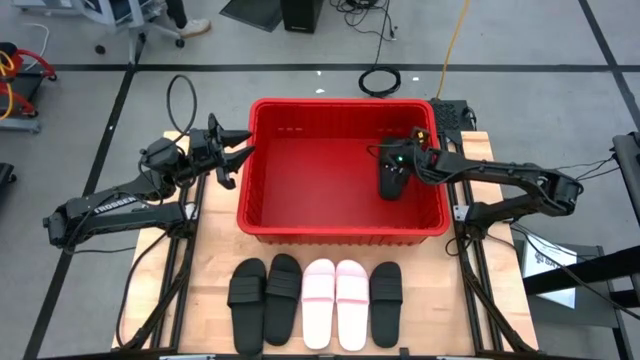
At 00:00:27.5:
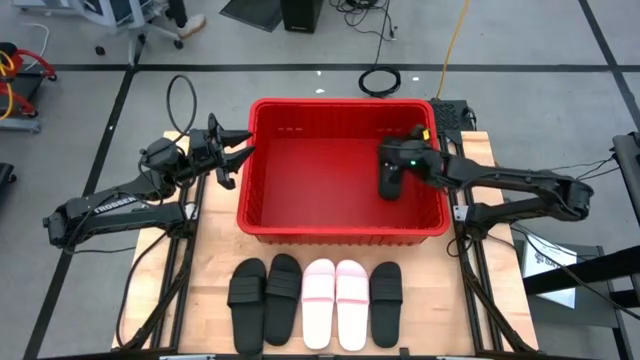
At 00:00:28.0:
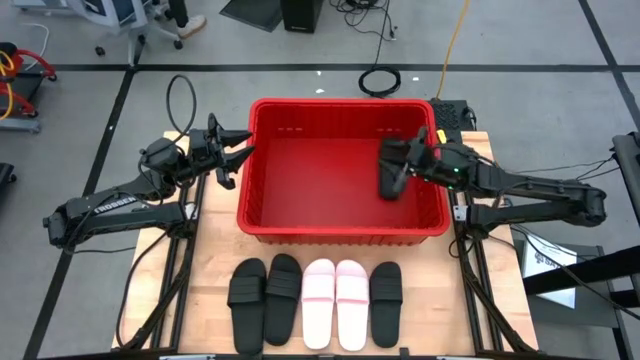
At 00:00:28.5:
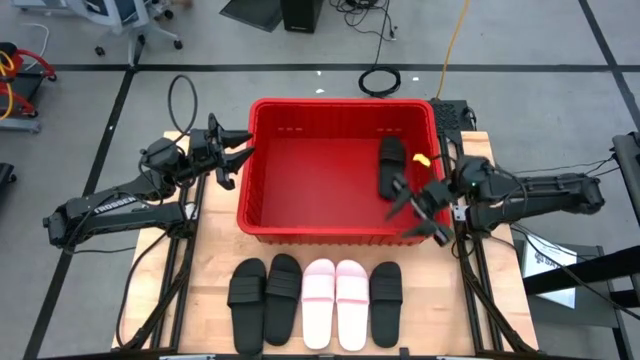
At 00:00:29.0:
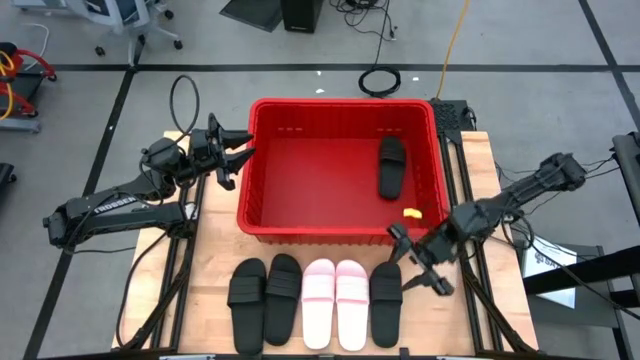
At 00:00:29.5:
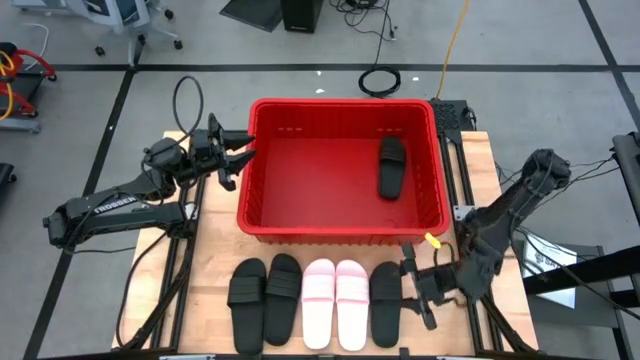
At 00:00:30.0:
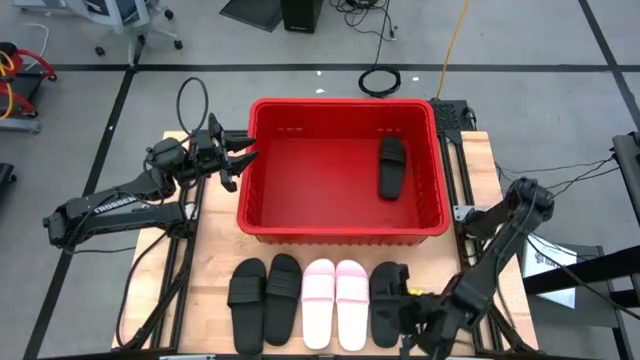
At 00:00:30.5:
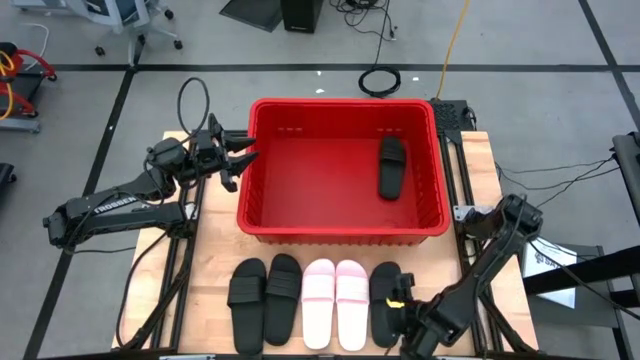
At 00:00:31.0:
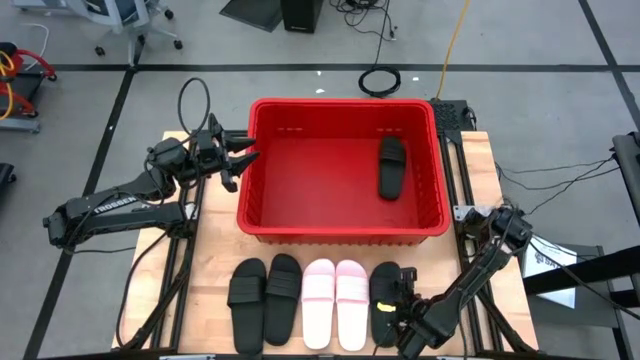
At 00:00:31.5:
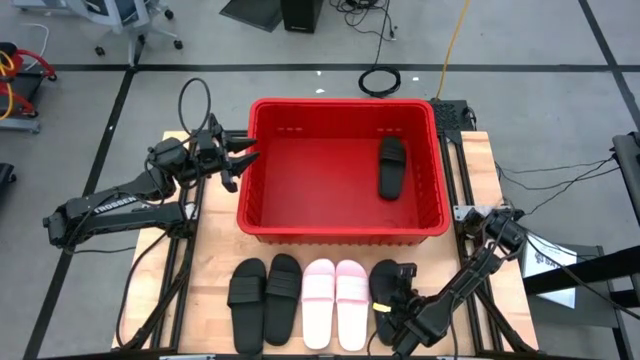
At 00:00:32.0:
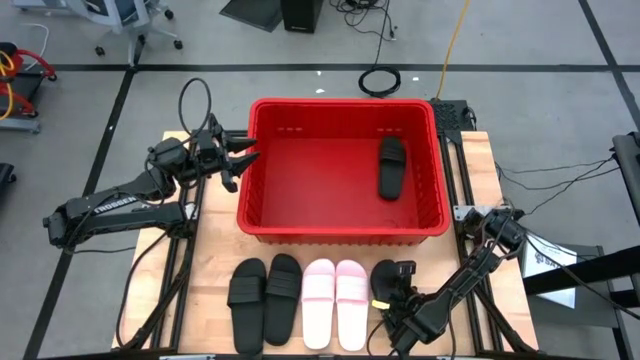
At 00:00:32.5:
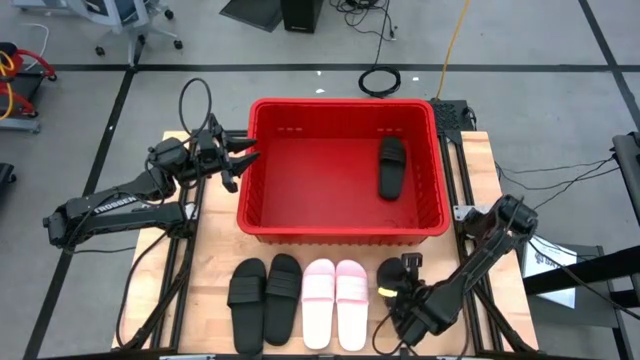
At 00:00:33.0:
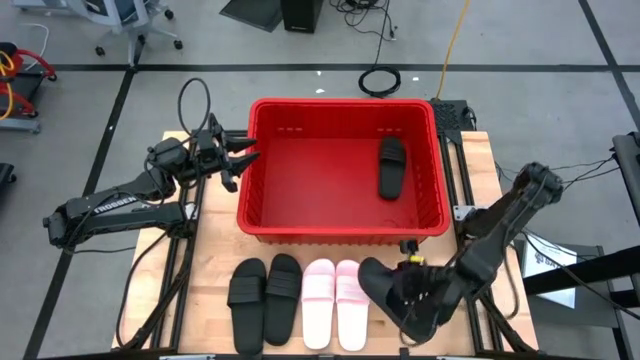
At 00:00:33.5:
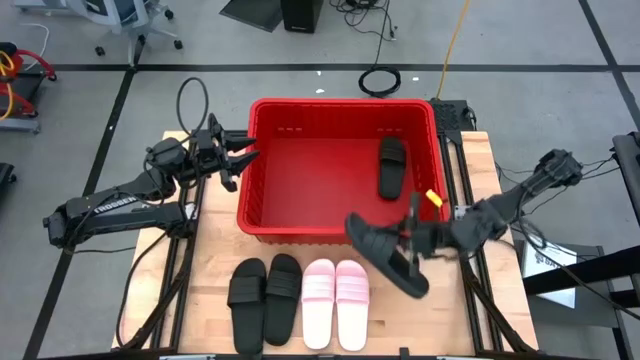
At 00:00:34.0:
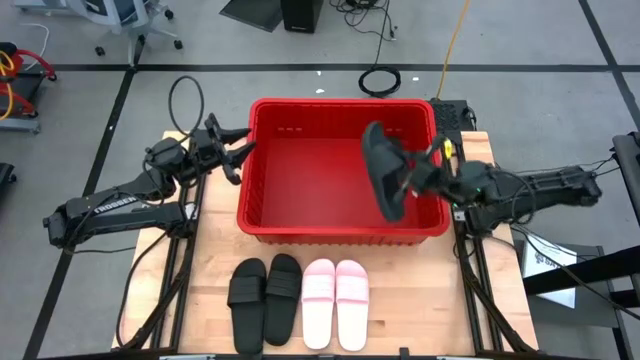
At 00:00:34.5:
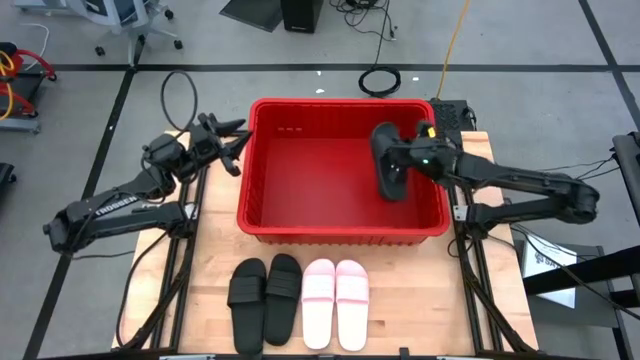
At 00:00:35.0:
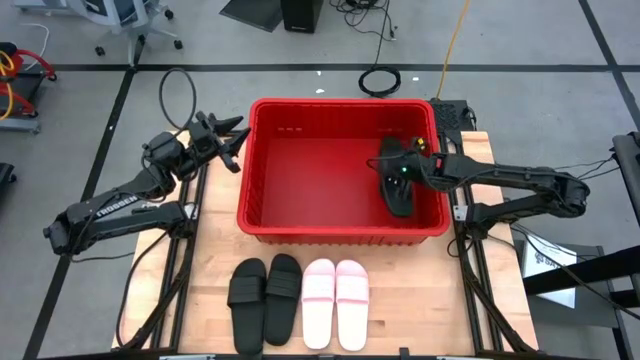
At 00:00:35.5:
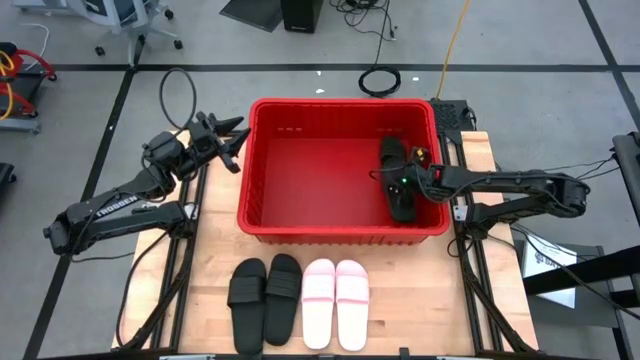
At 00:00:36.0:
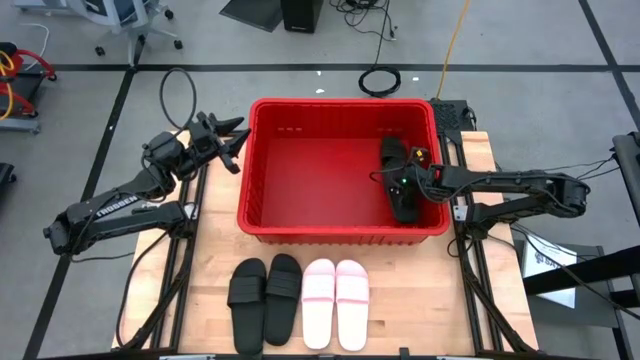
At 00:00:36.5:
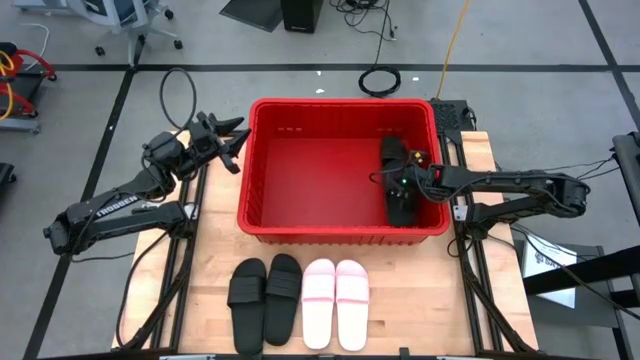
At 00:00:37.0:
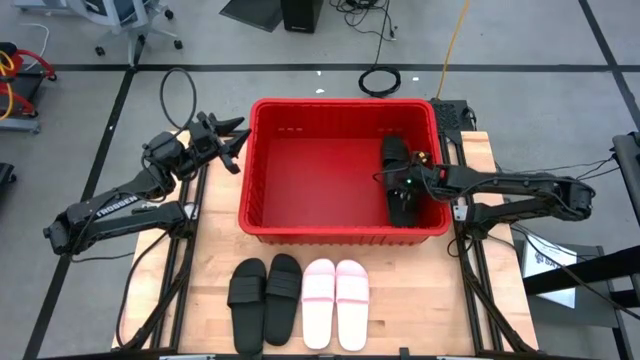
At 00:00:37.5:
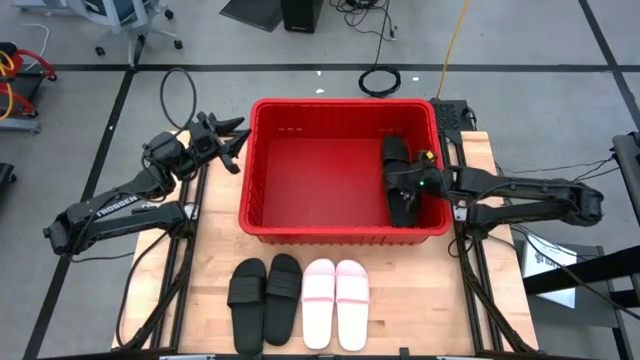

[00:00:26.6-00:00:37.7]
Task: Pick and place slides into bin
Put the black slipper into the red container

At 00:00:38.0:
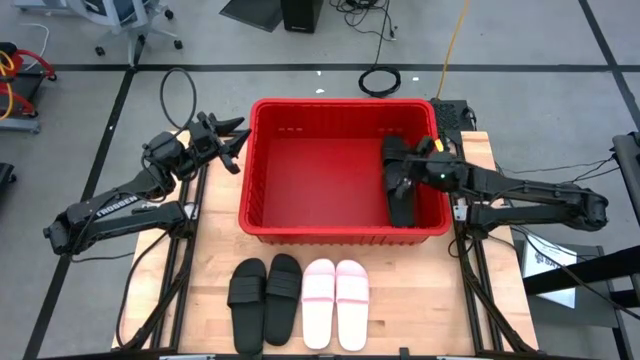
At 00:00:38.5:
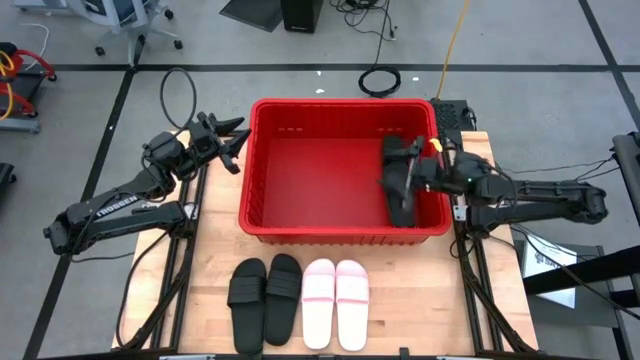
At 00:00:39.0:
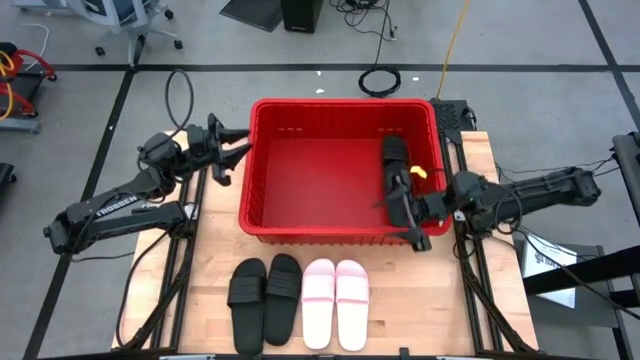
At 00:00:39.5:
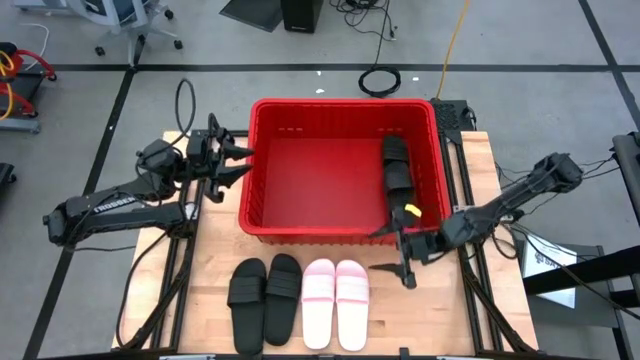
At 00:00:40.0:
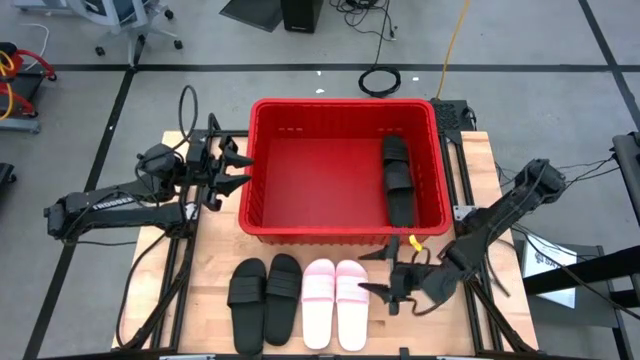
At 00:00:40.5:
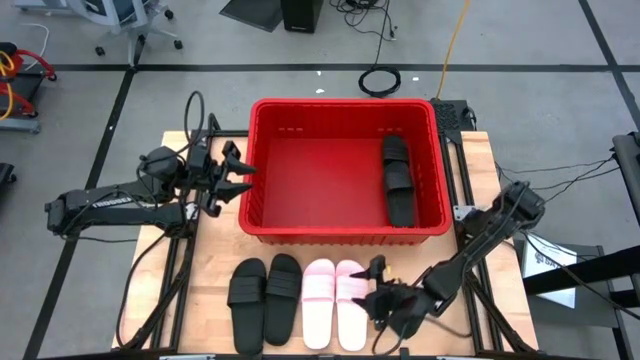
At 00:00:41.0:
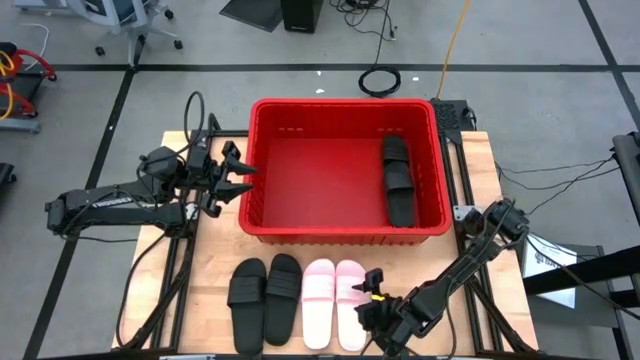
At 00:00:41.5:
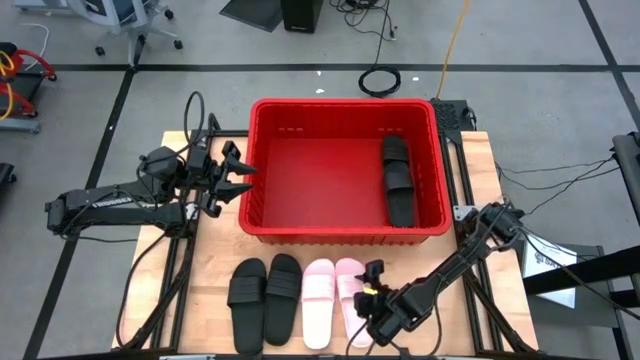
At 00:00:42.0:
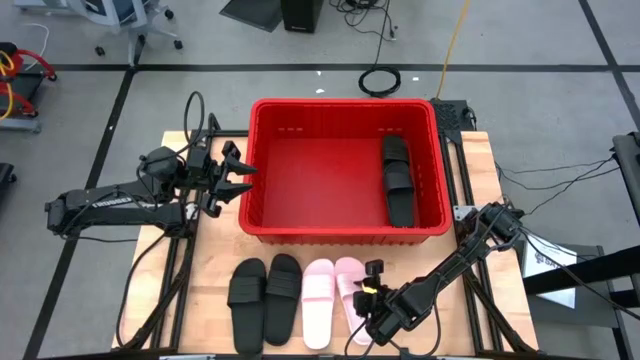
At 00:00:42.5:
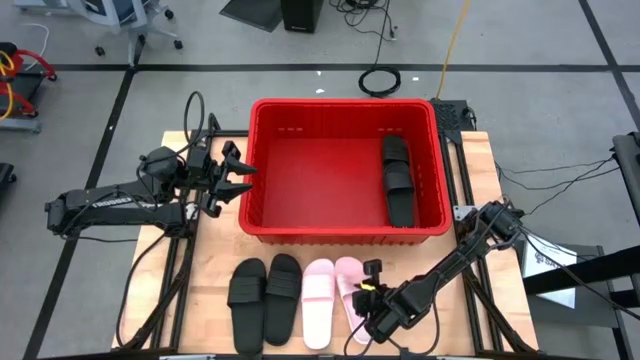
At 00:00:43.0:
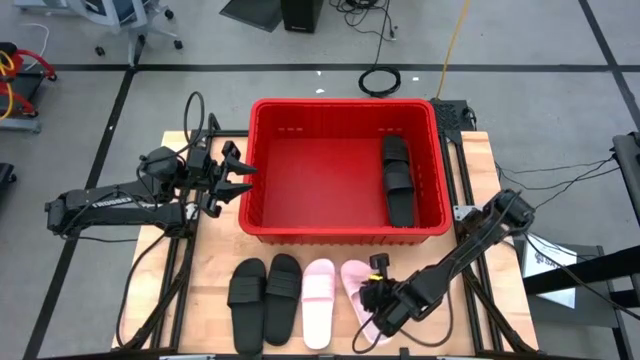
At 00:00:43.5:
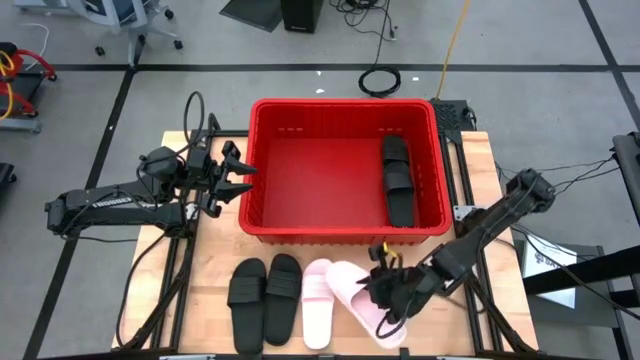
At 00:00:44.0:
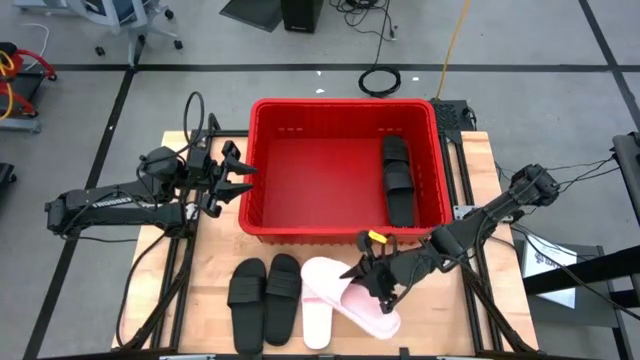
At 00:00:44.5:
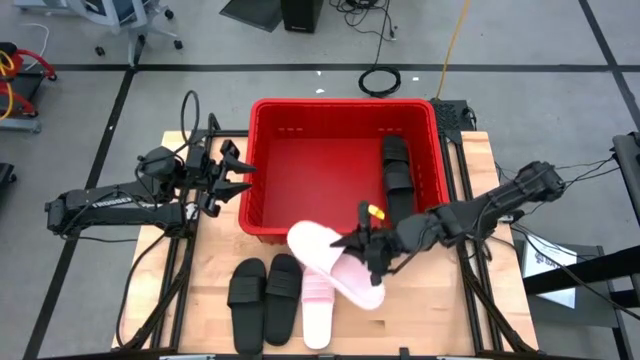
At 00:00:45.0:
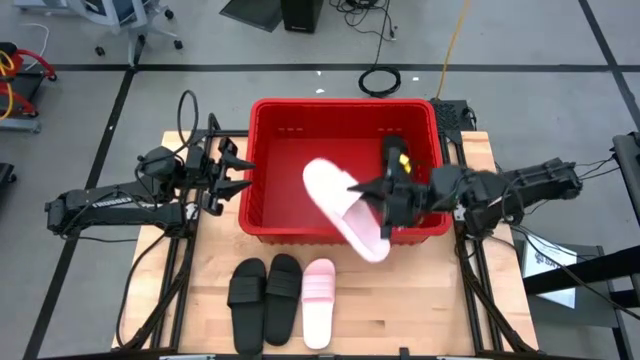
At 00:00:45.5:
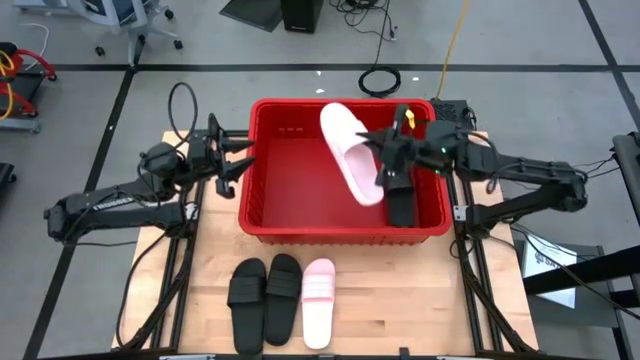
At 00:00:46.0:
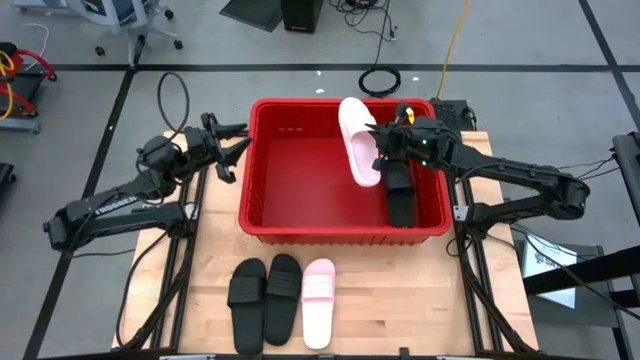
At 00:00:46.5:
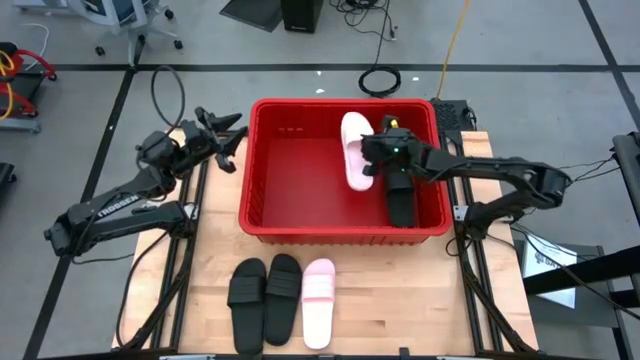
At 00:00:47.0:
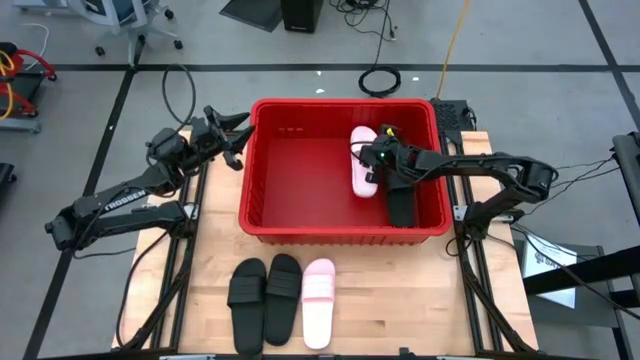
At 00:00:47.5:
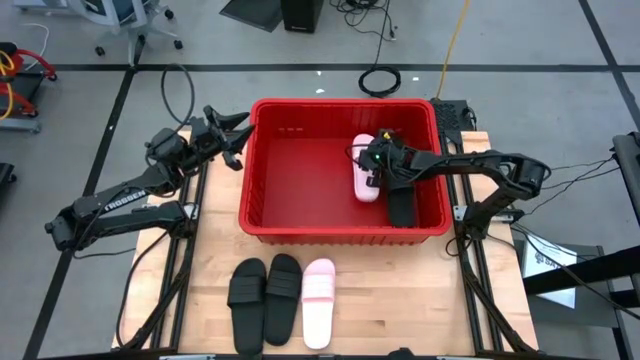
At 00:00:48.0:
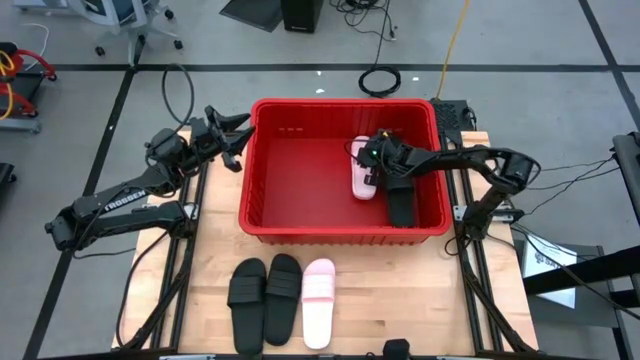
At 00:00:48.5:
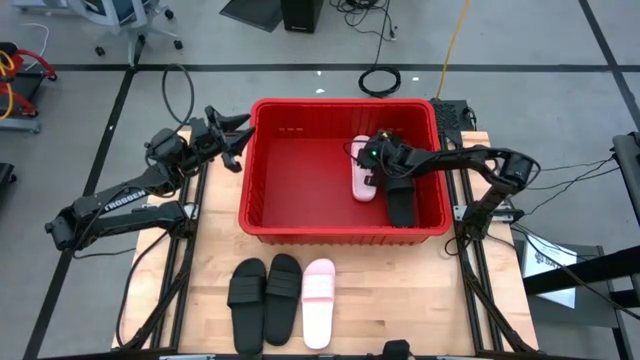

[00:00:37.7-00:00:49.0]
Put the pink slipper into the red container
